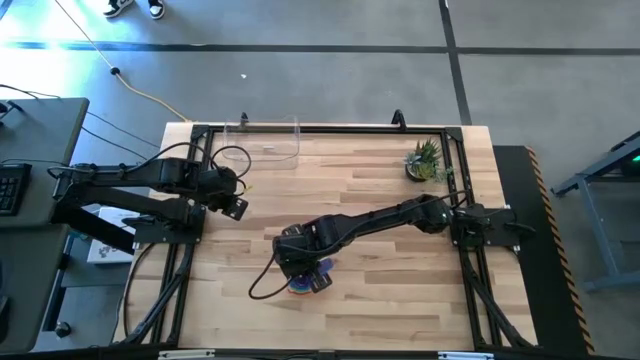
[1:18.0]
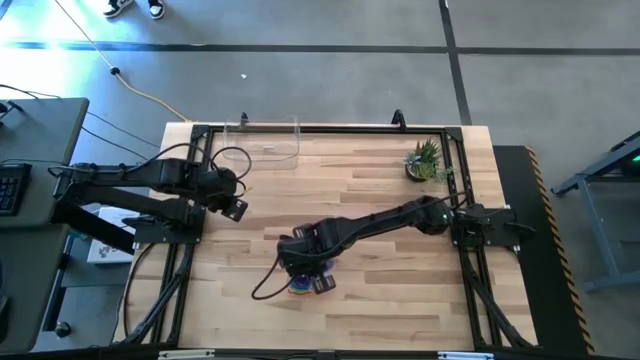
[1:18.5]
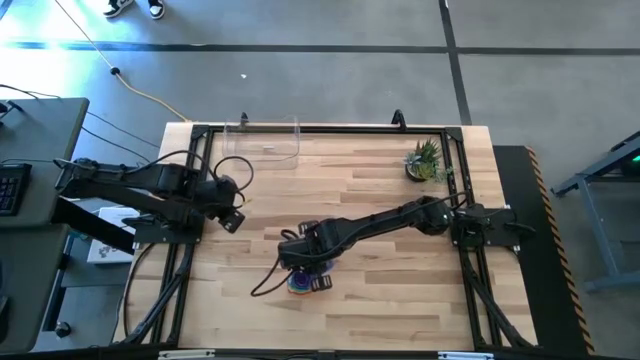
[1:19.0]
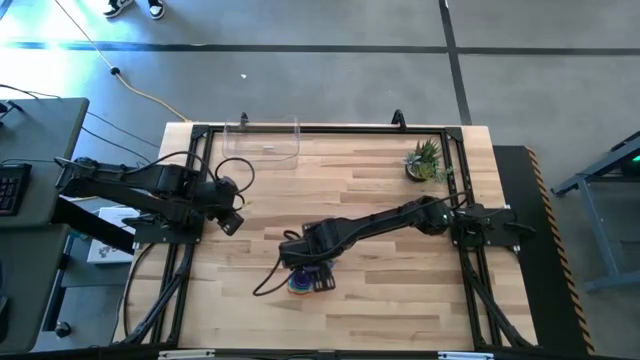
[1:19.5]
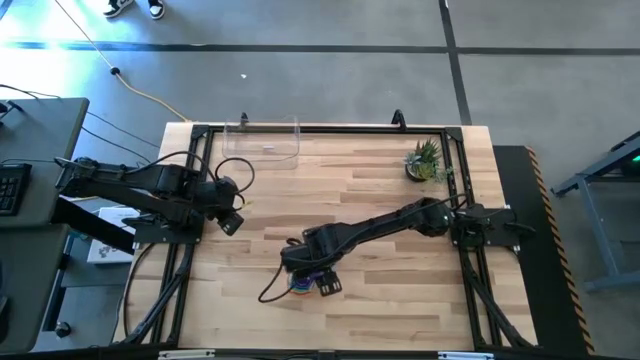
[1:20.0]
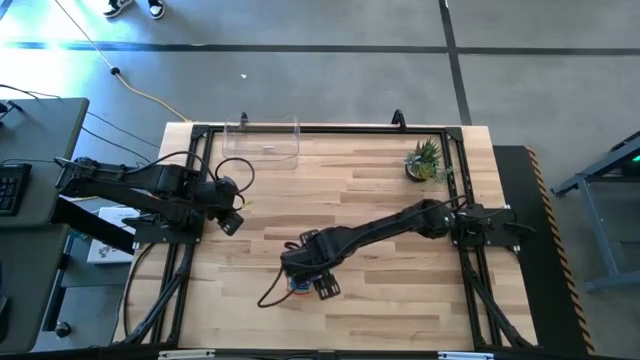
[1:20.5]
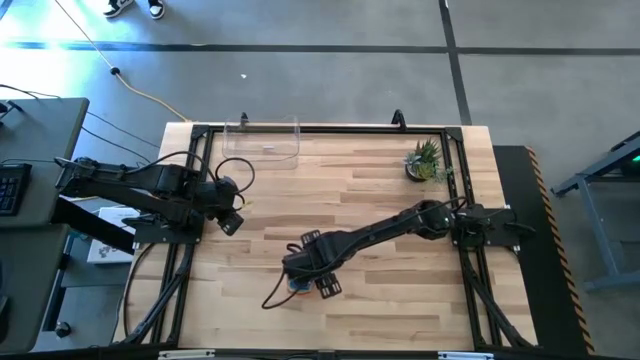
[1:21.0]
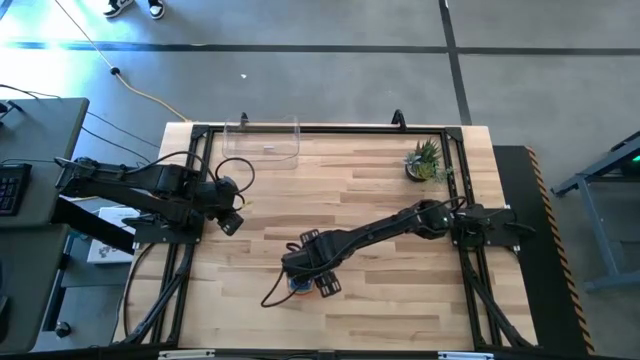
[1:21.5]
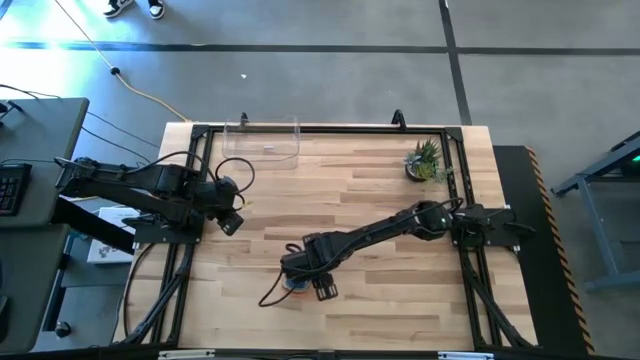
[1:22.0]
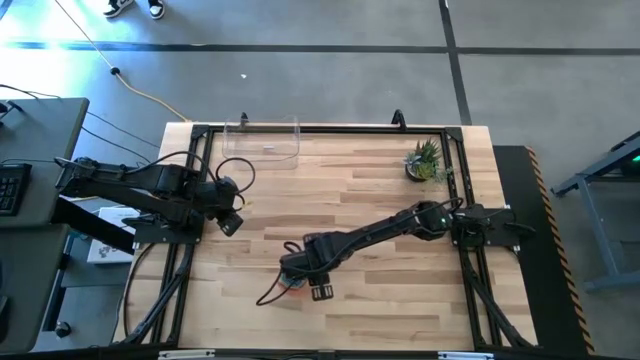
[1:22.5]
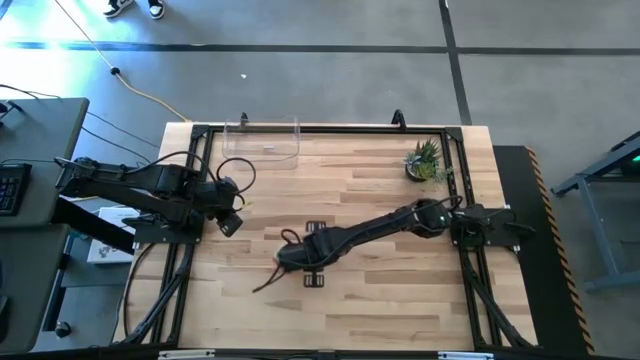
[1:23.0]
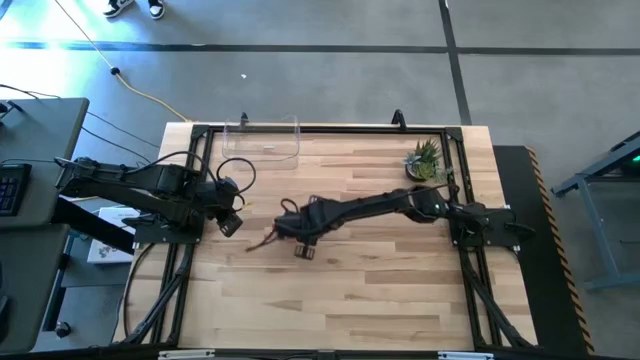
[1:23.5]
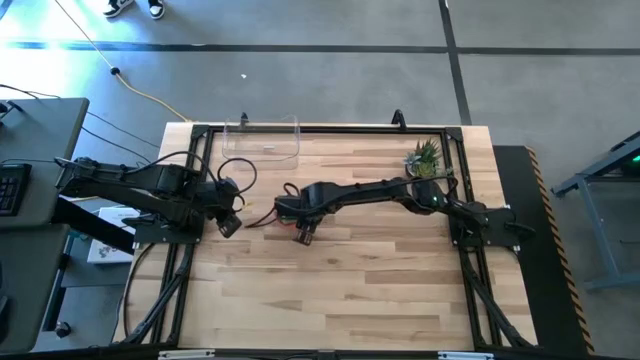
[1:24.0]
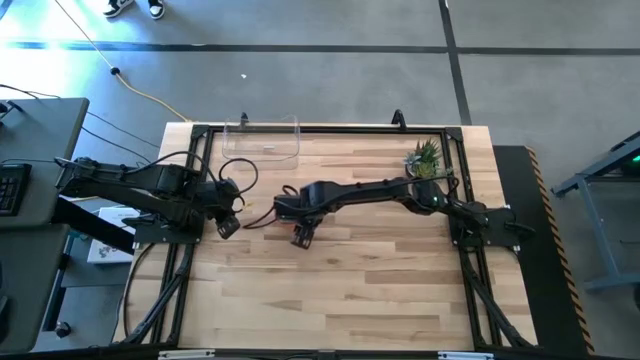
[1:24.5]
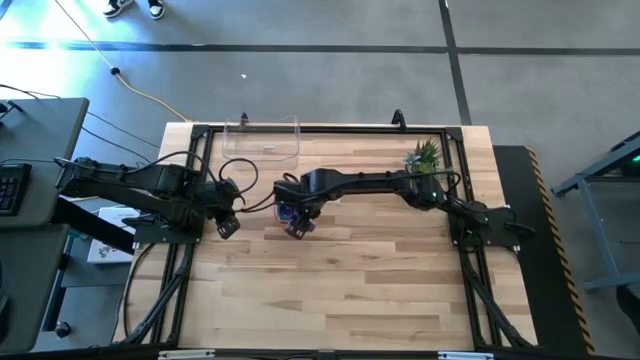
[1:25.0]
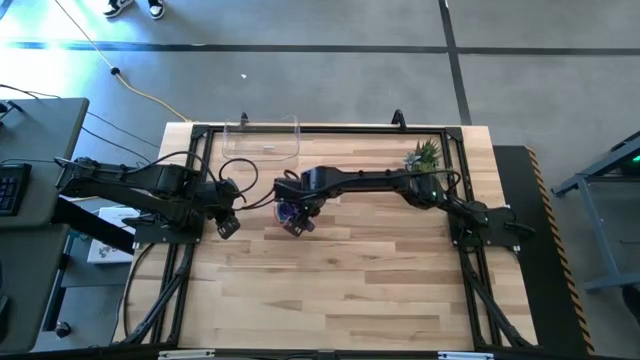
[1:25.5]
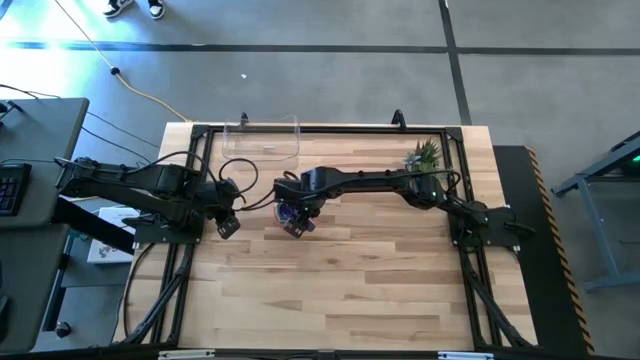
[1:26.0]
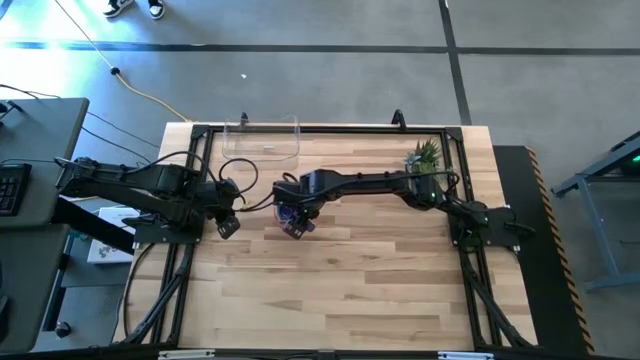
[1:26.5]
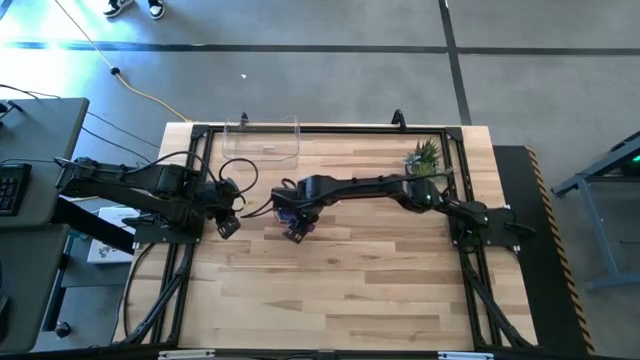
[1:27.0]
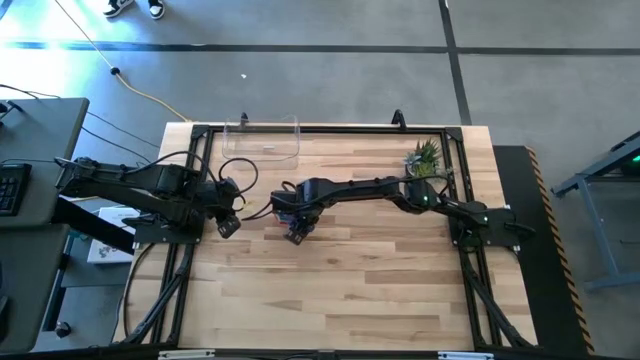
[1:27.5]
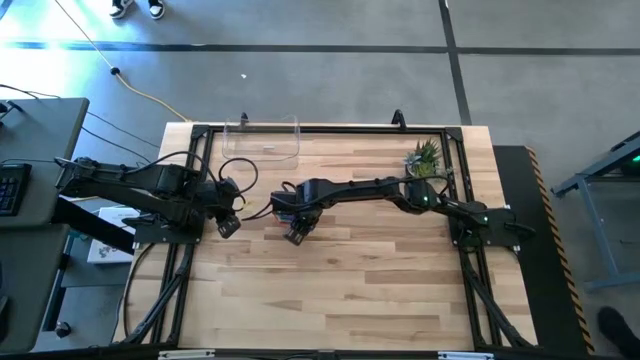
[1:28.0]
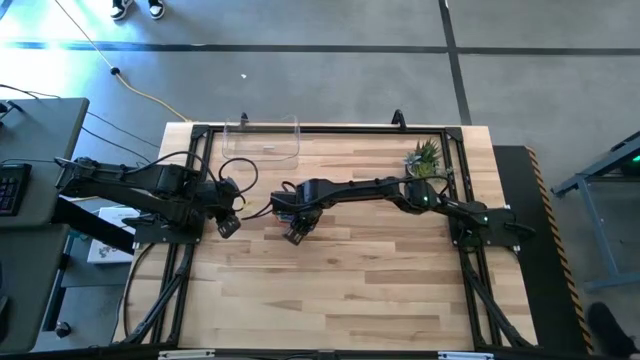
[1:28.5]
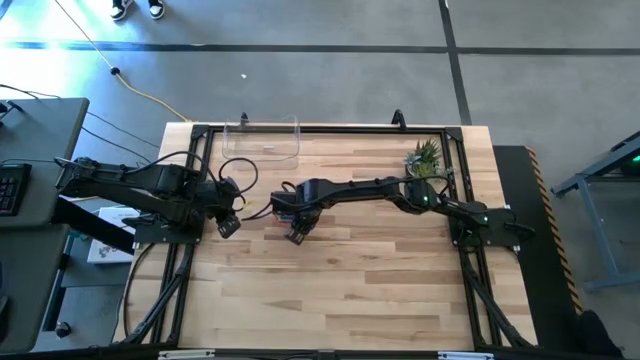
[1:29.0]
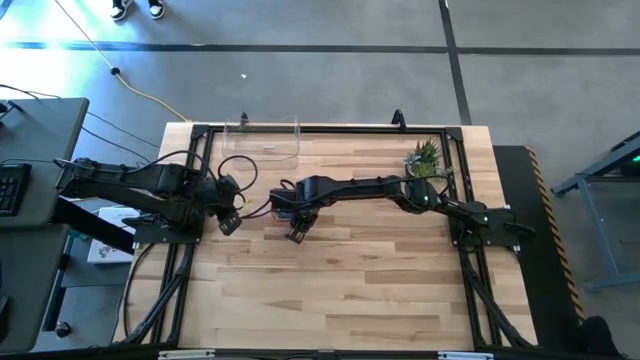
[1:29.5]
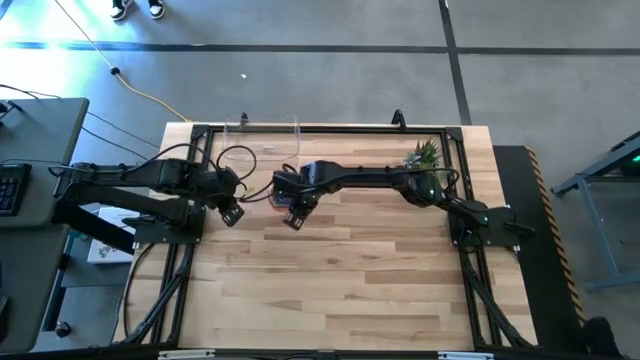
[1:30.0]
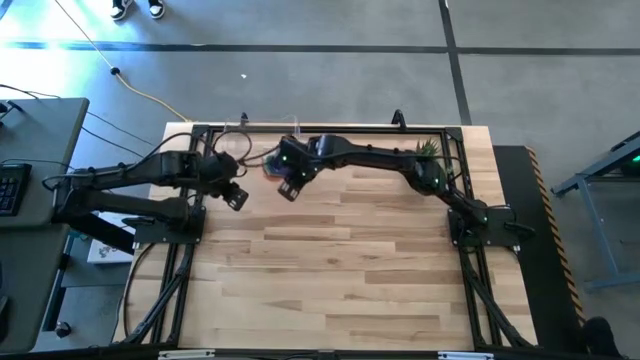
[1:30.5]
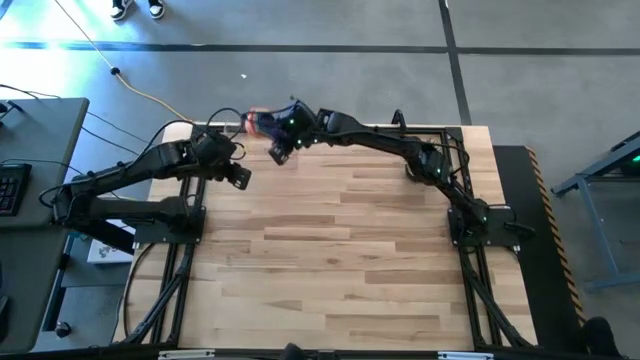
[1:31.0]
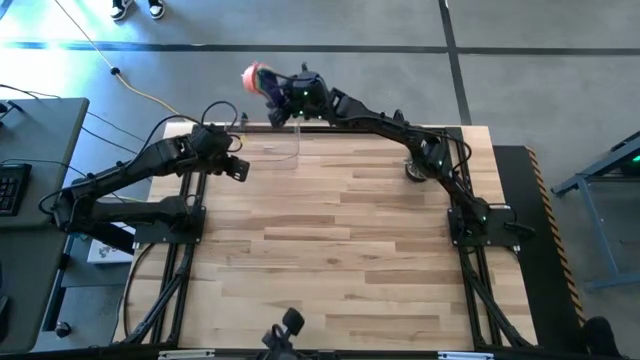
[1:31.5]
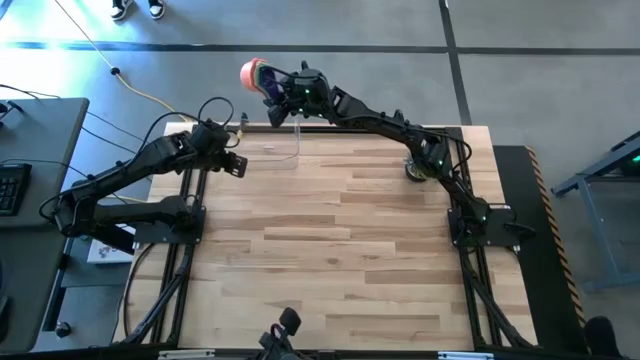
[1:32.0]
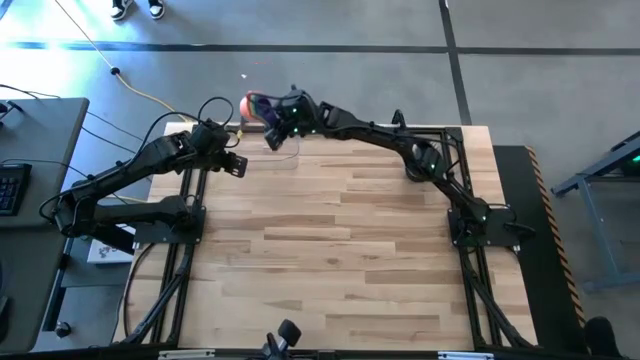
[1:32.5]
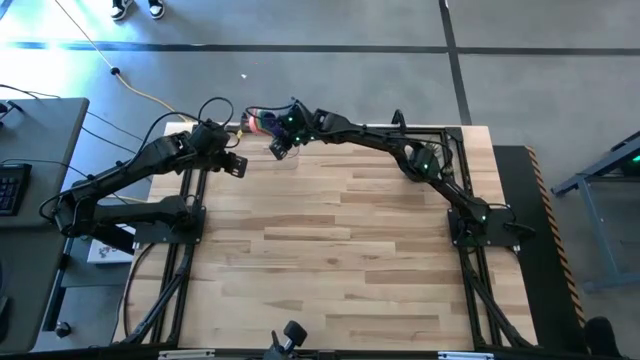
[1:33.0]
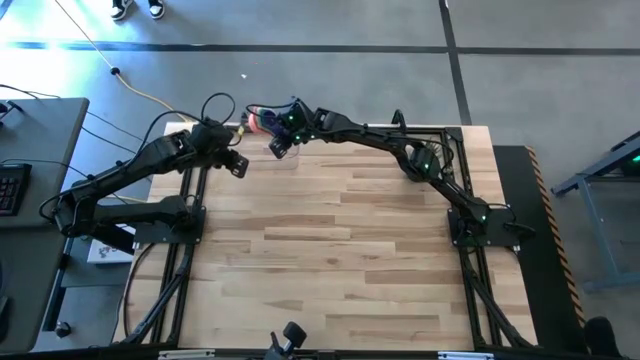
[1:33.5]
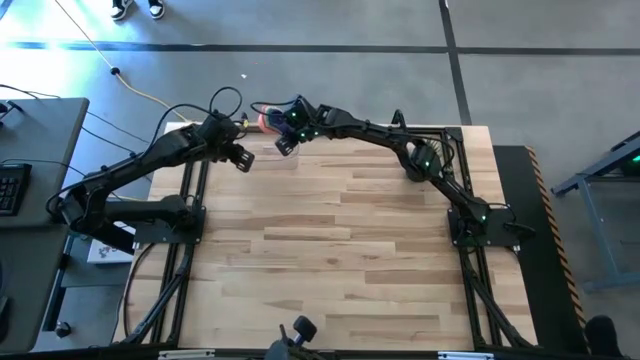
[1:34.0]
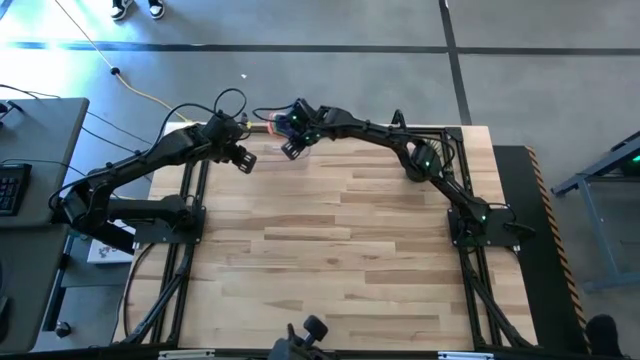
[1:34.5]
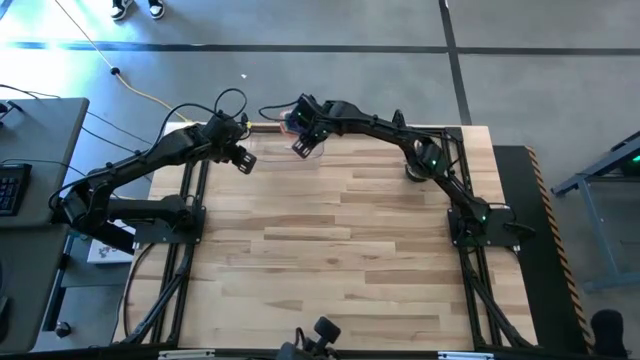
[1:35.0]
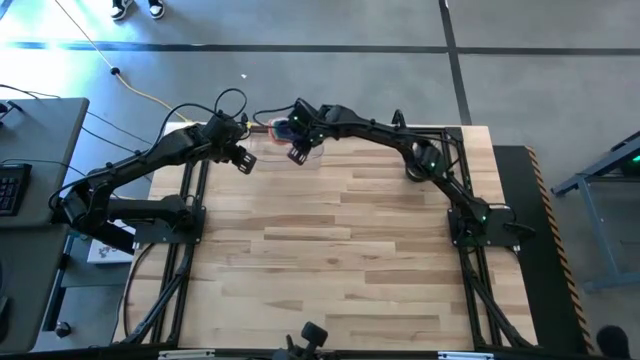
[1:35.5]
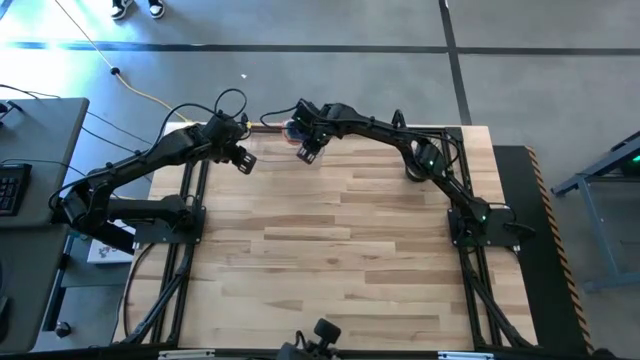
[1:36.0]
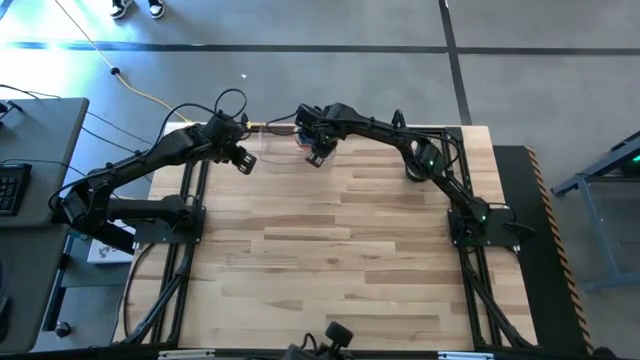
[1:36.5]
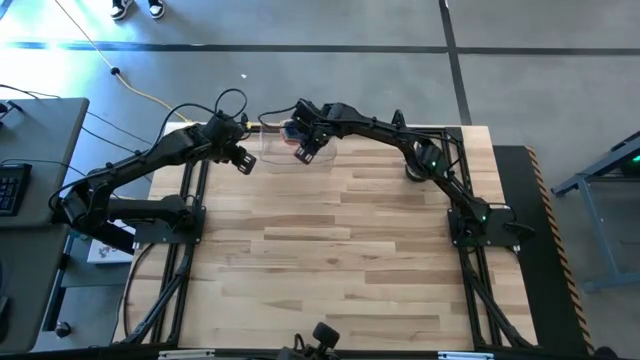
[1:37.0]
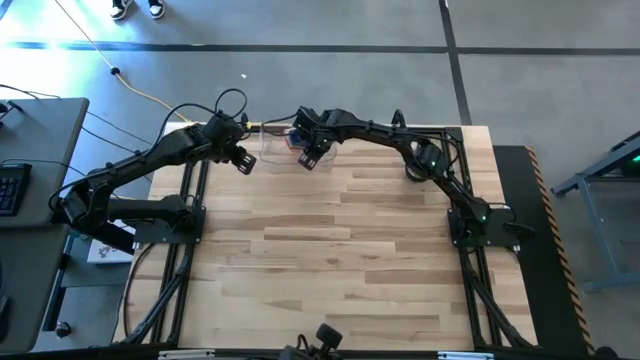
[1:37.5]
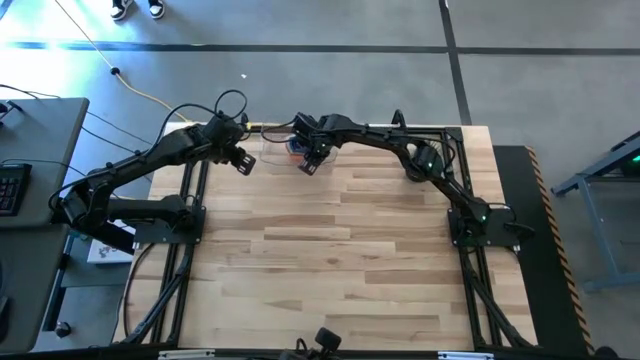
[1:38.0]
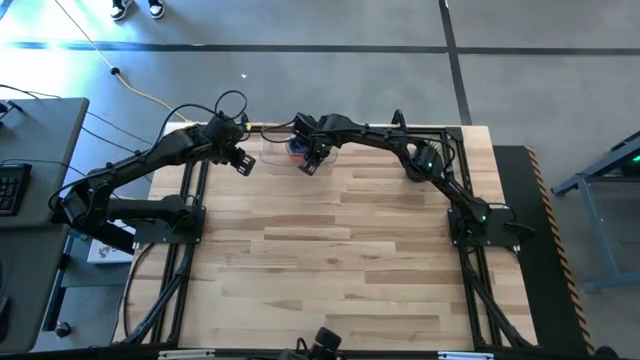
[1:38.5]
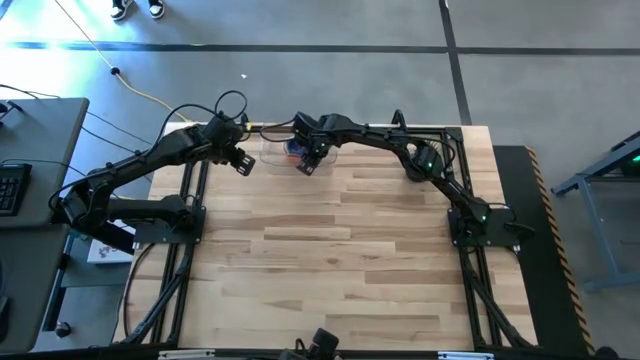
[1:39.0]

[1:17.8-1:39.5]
Task: Nest measuring cups in basket
Put the nested measuring cup into the transparent bin
